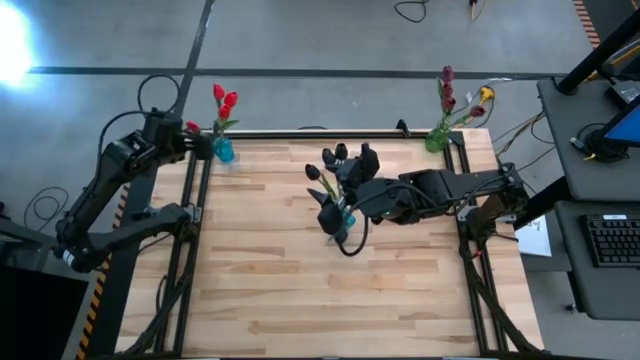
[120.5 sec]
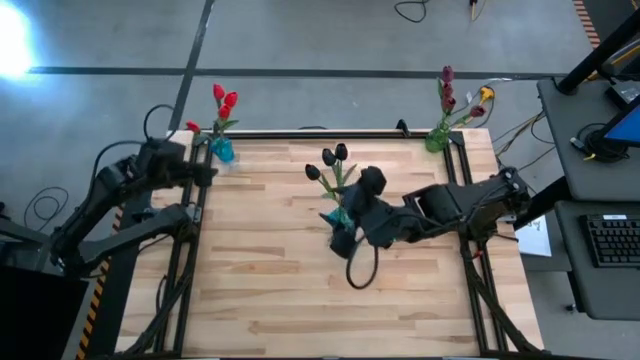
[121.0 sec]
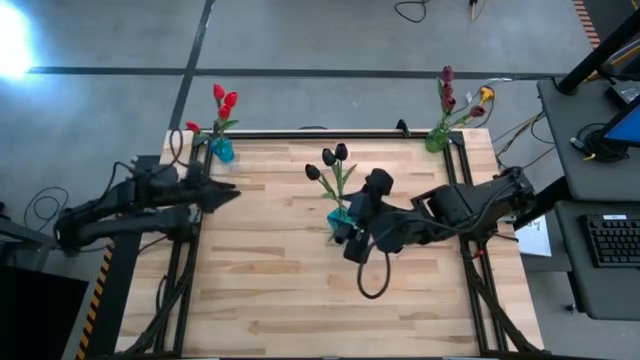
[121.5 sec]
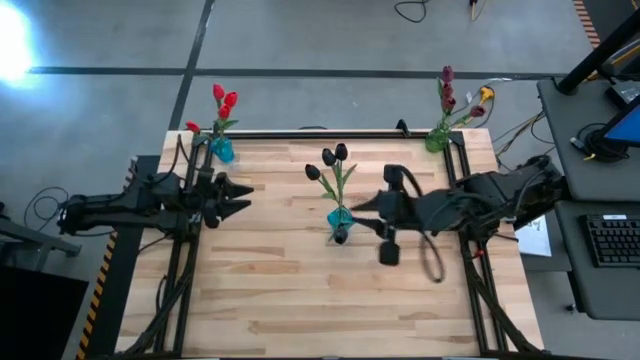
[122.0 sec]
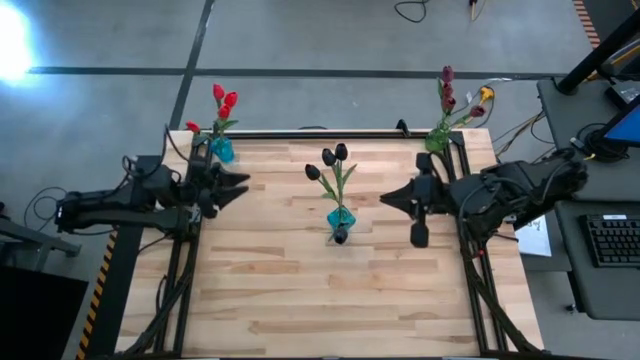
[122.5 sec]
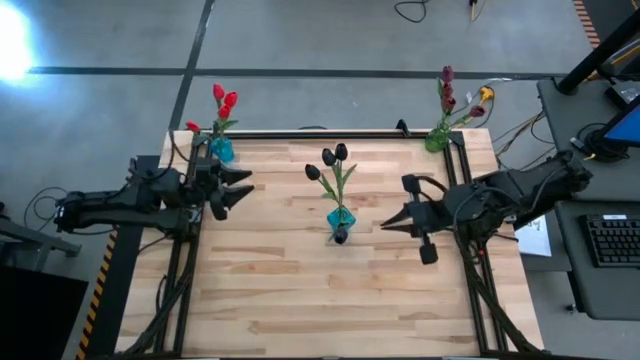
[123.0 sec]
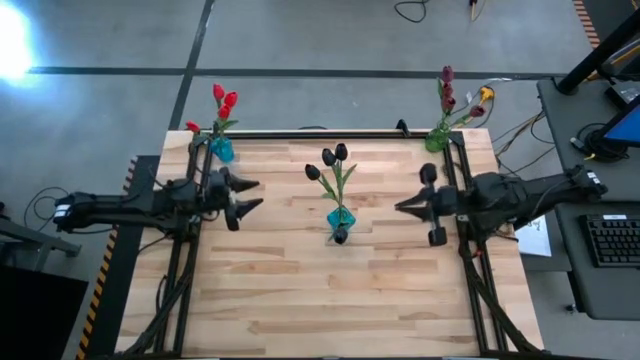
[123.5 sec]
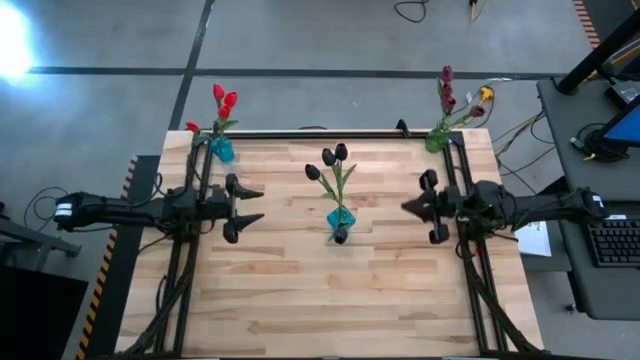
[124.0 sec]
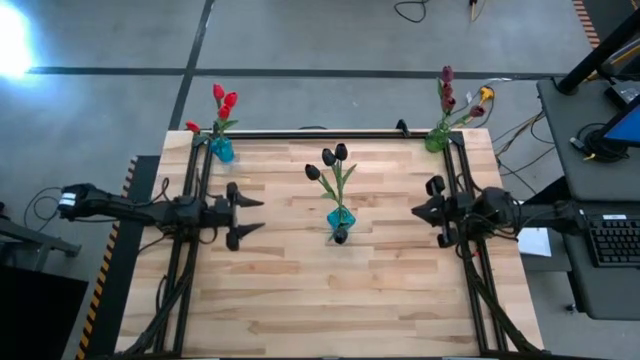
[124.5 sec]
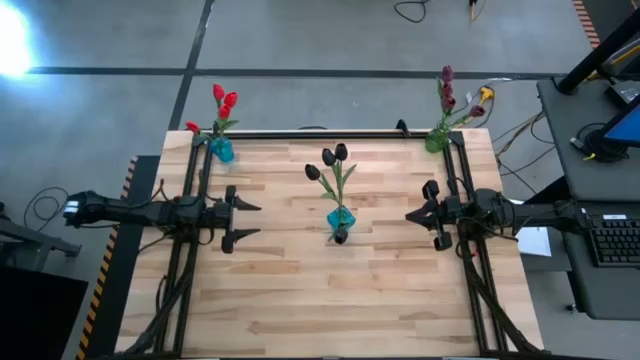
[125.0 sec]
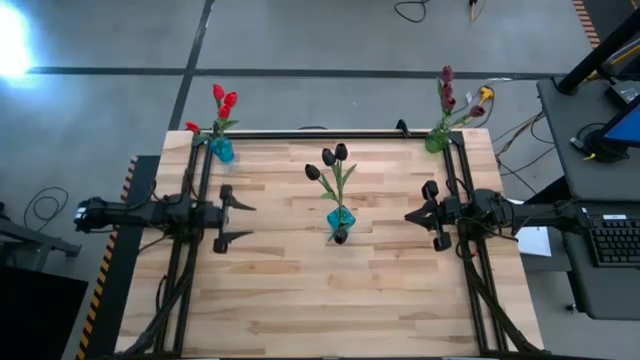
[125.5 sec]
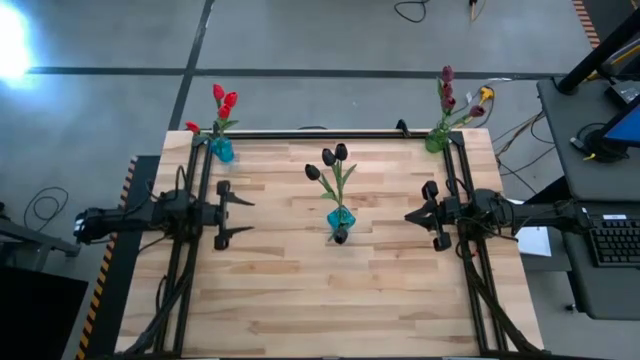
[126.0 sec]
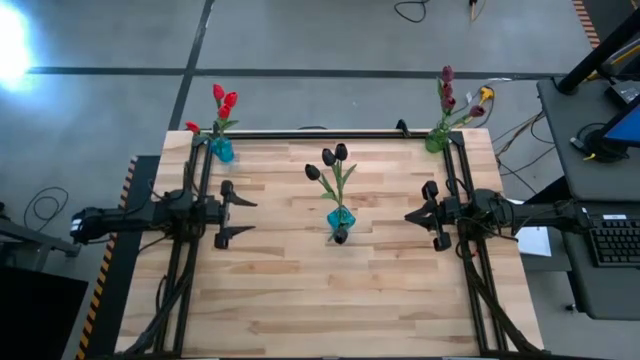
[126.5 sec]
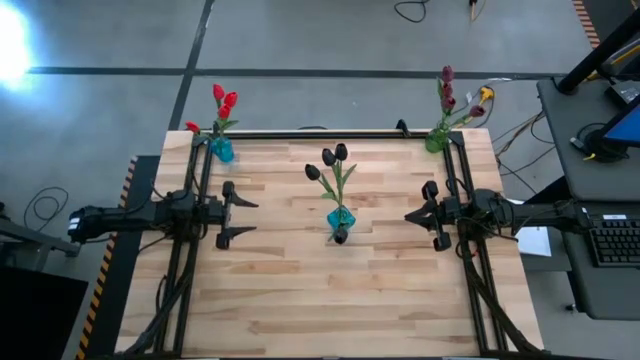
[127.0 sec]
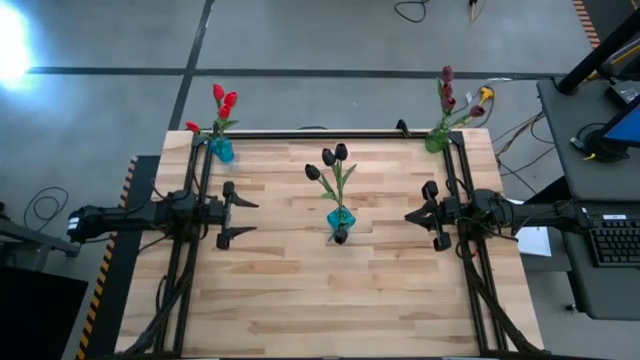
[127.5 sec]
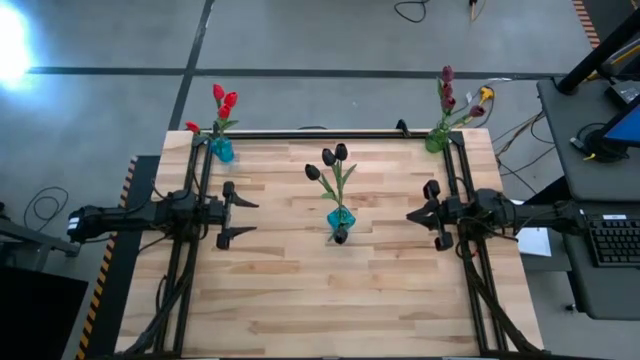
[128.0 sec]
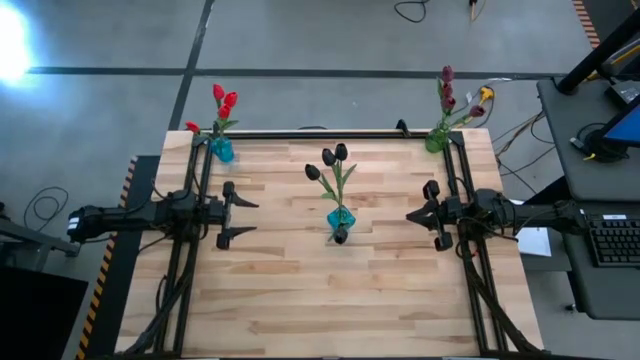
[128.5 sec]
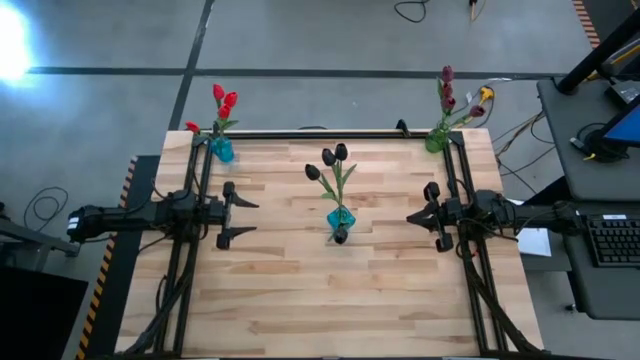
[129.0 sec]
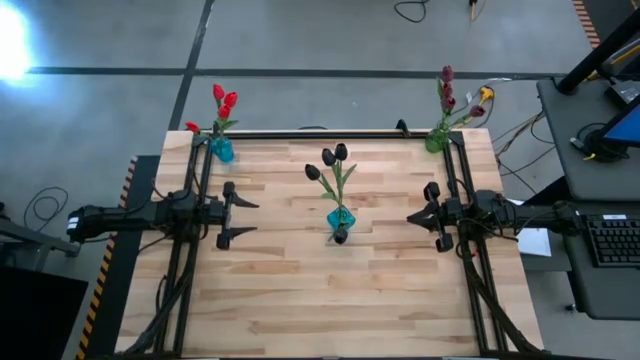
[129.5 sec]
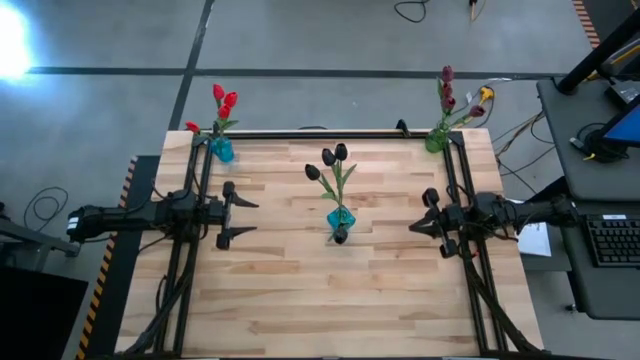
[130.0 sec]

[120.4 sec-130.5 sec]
Task: Sort flowers into vase by color
Return to Home Position

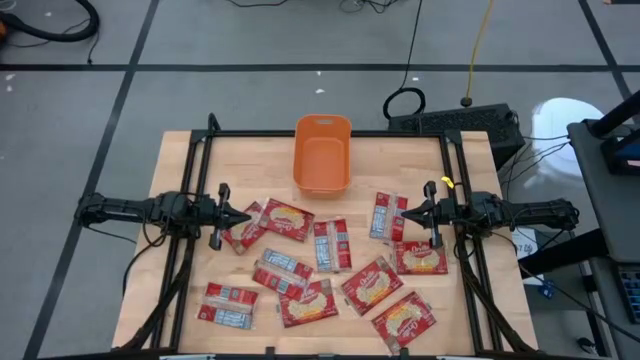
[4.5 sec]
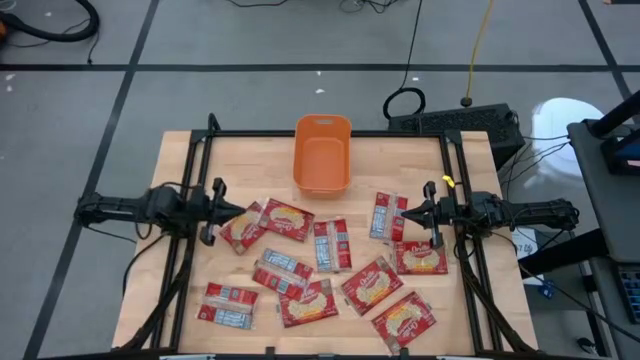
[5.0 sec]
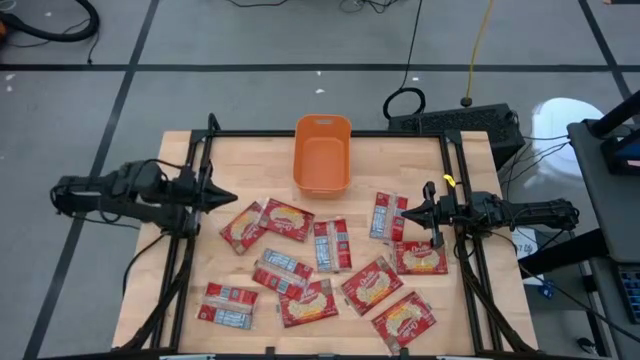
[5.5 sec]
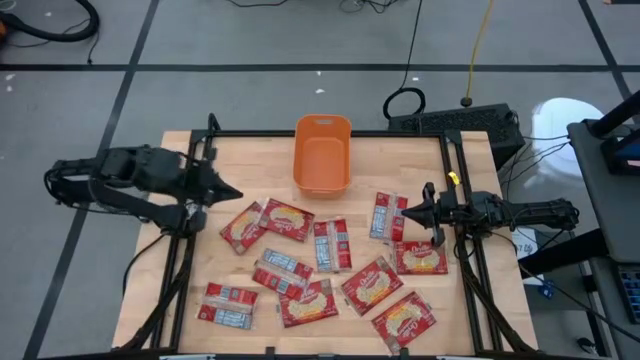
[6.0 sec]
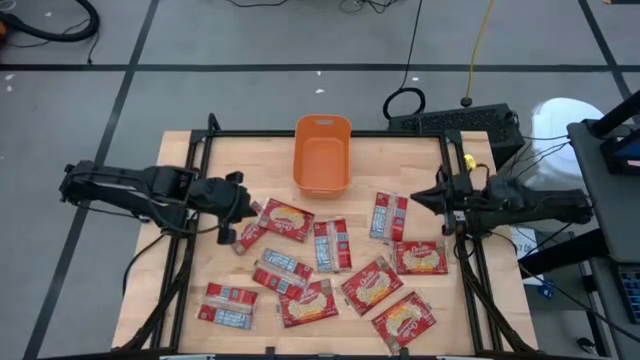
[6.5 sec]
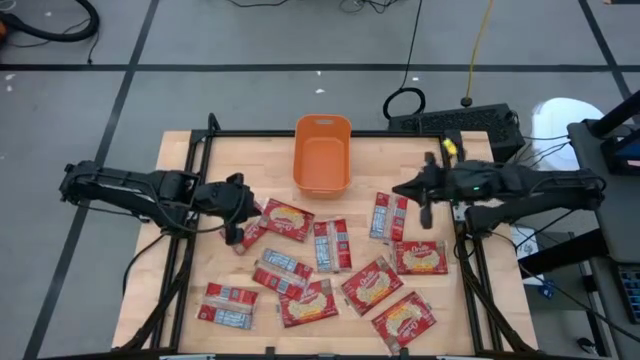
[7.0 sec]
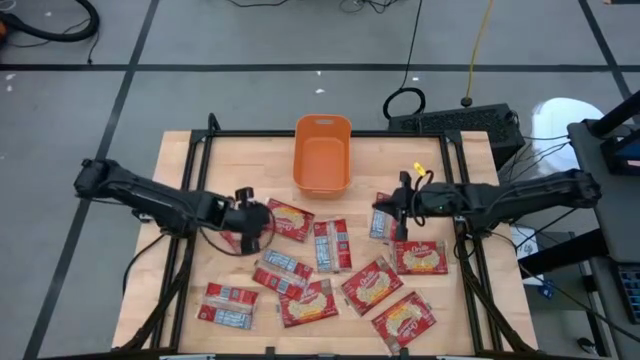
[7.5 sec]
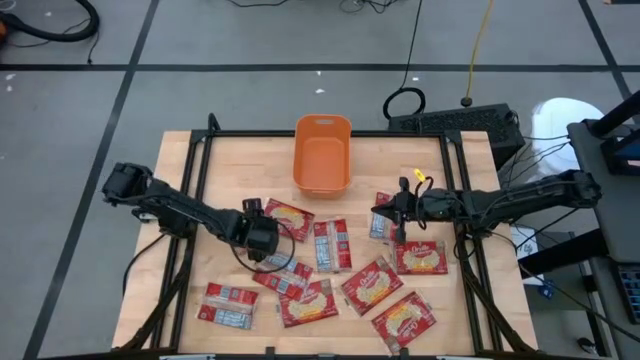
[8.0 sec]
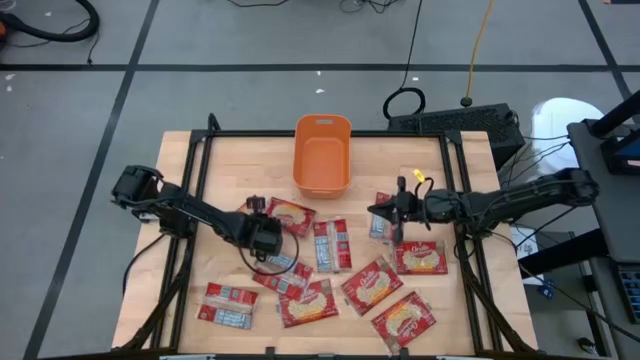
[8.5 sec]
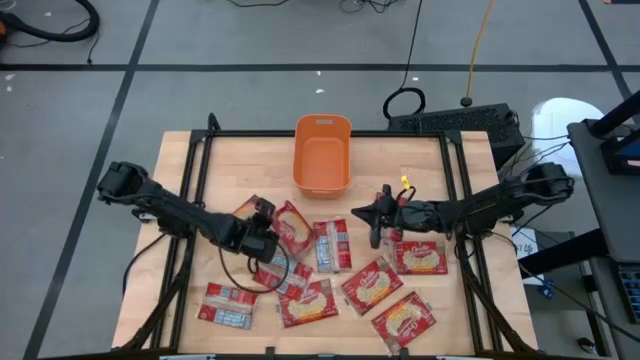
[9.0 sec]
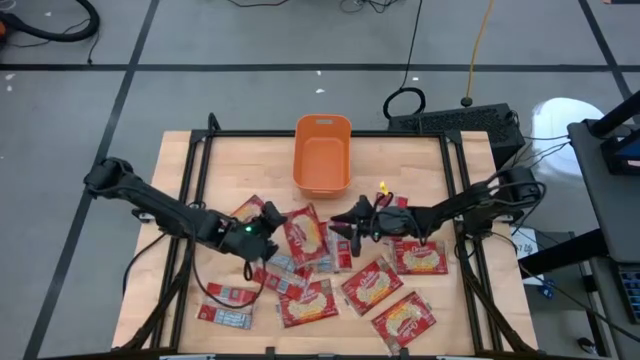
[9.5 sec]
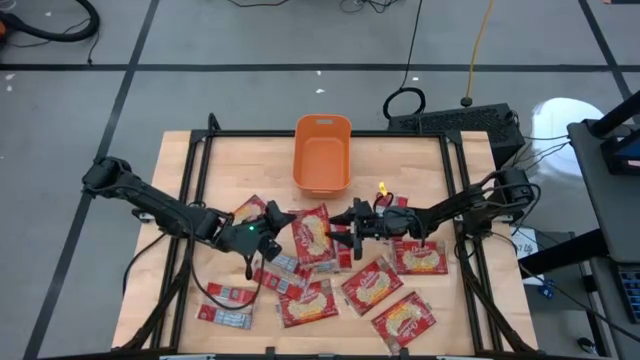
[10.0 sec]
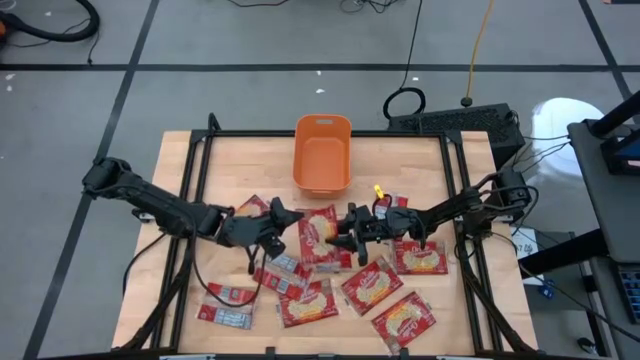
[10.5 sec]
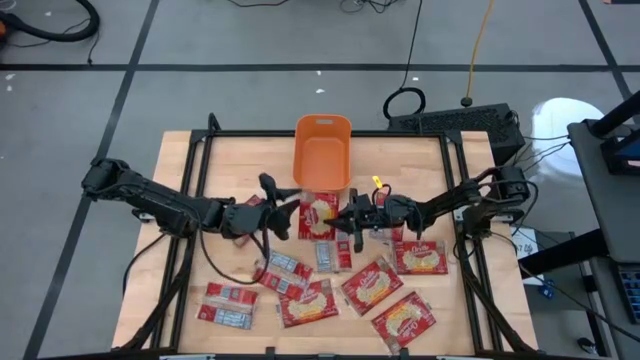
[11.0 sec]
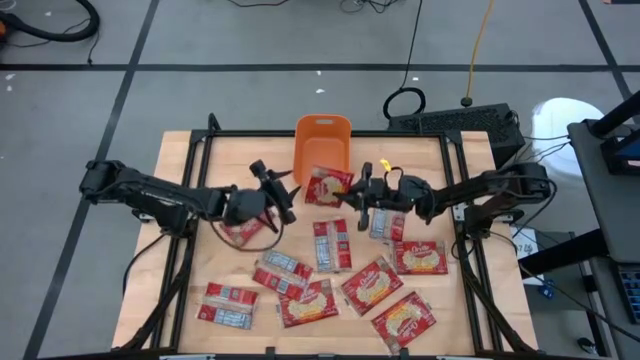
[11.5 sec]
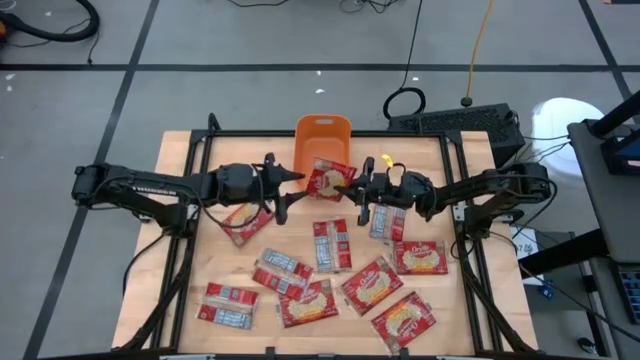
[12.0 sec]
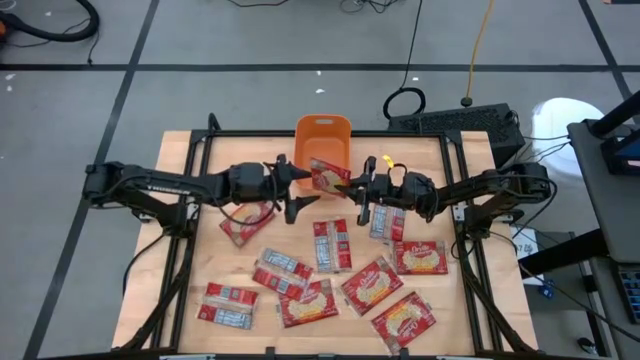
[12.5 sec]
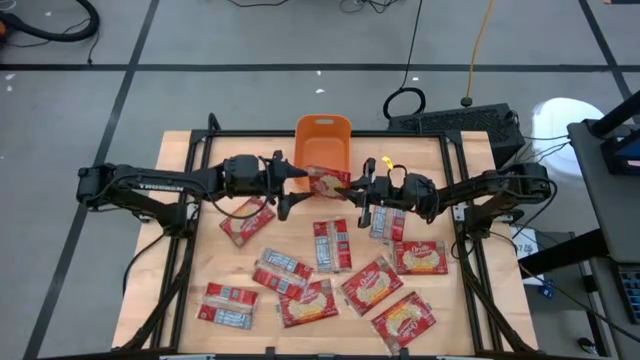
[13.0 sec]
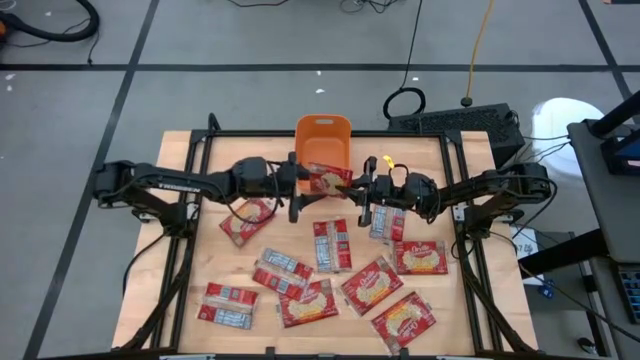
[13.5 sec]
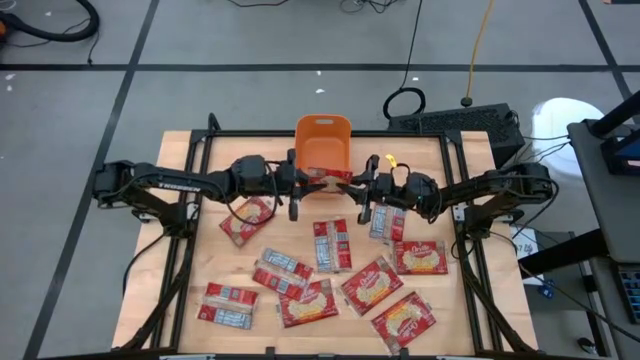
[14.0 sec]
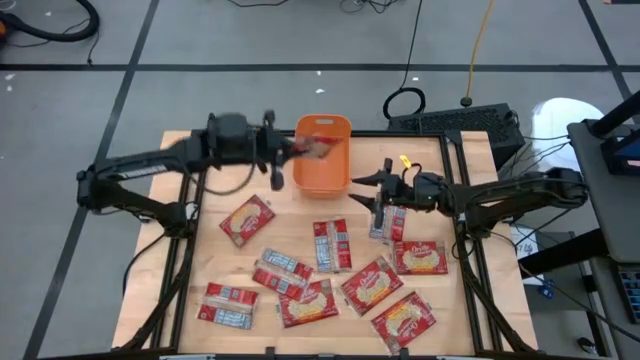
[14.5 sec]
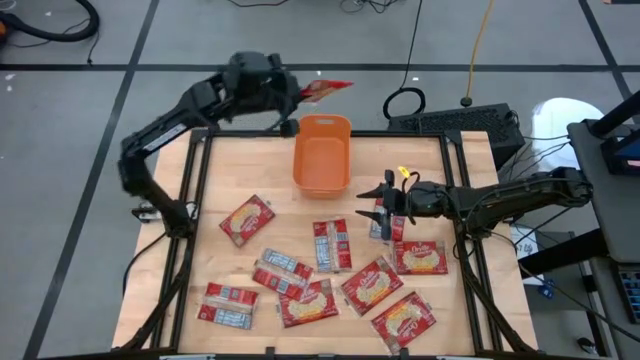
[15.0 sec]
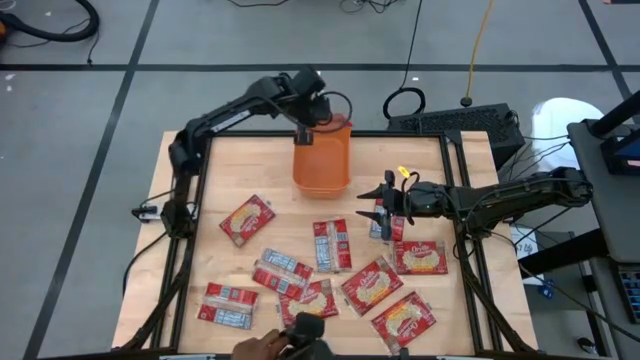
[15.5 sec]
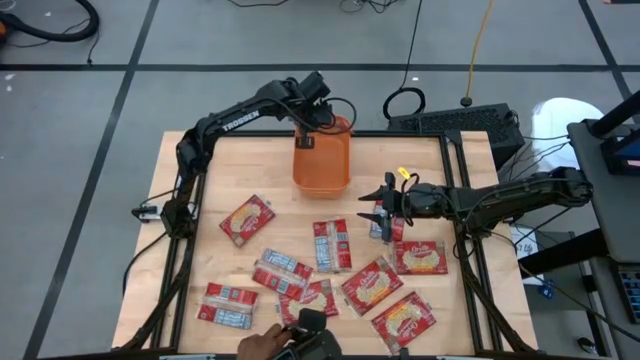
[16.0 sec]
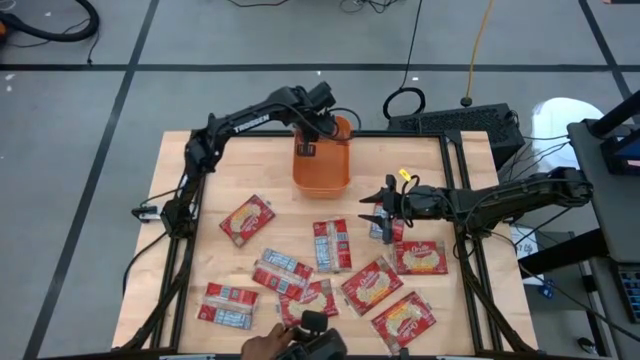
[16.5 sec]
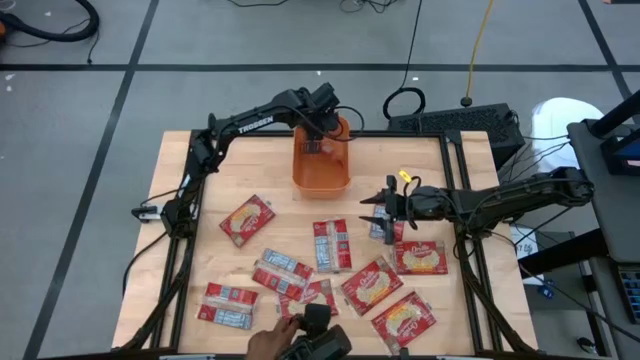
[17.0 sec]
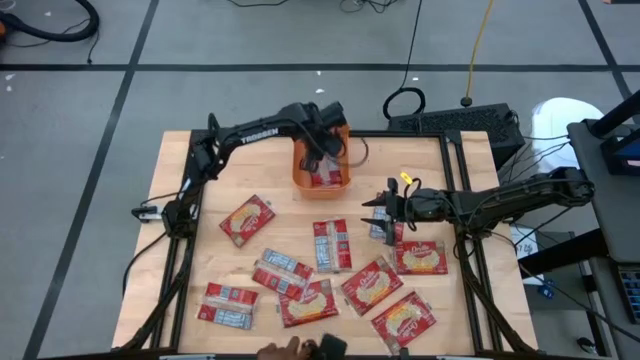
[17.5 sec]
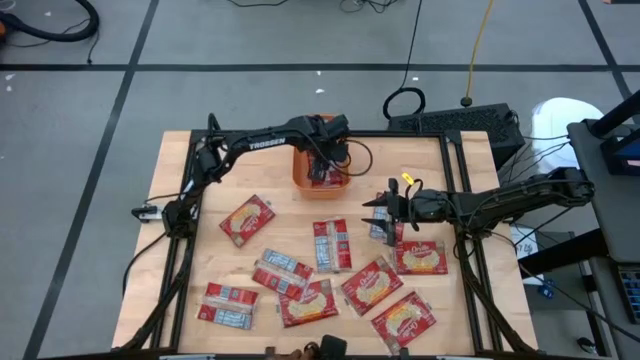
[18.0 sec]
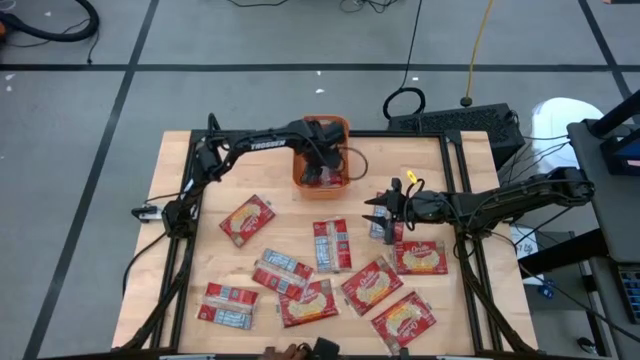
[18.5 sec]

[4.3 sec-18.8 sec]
Task: Sort popcorn bags into baskets
Put the red popcorn bag into the orange bin
